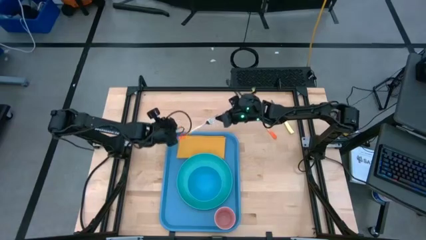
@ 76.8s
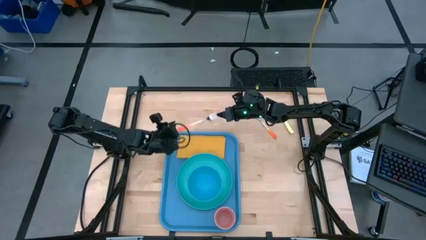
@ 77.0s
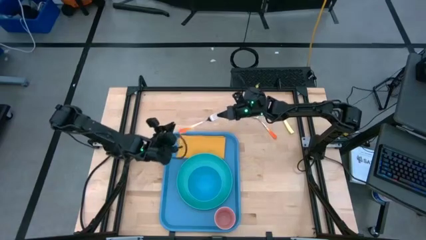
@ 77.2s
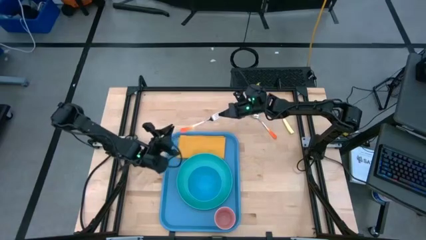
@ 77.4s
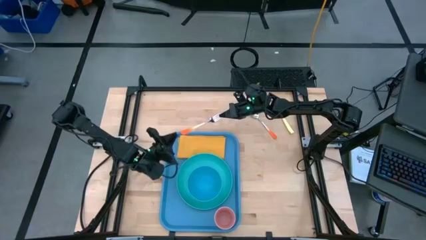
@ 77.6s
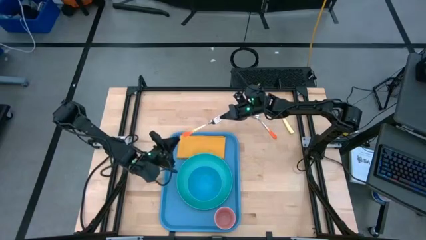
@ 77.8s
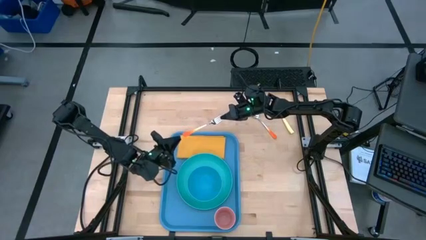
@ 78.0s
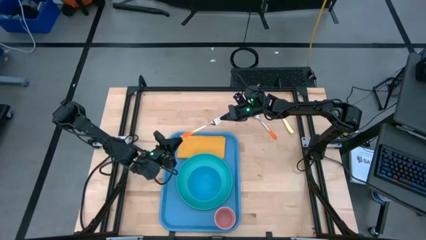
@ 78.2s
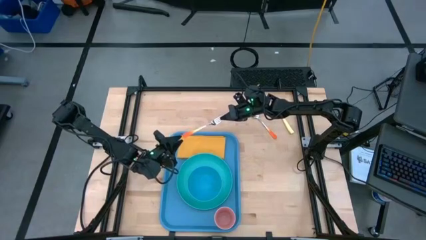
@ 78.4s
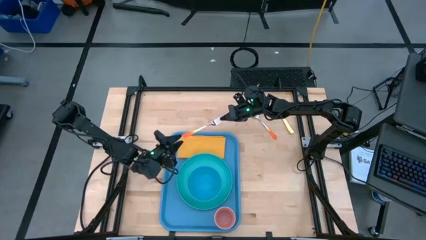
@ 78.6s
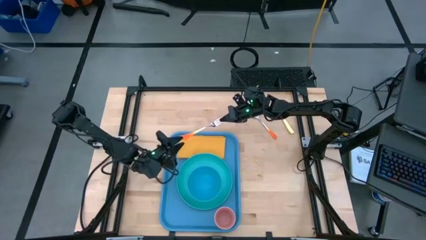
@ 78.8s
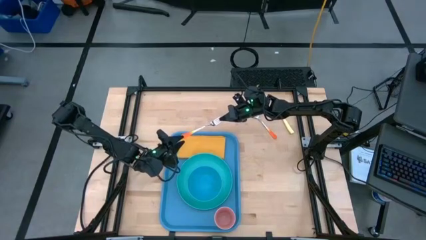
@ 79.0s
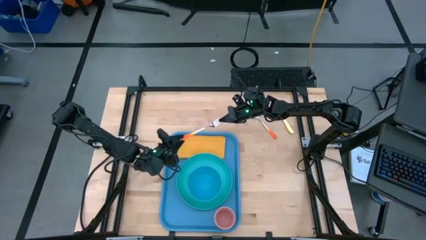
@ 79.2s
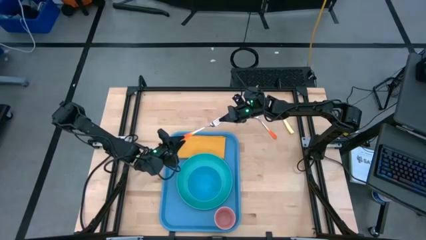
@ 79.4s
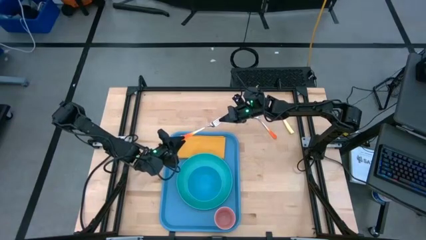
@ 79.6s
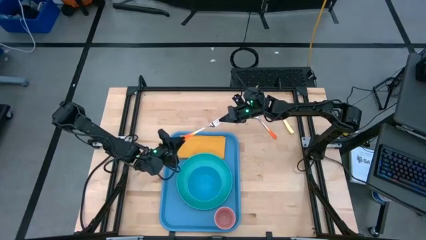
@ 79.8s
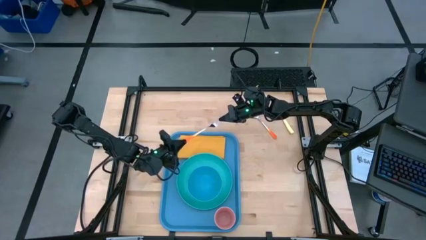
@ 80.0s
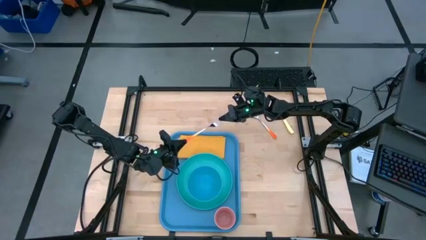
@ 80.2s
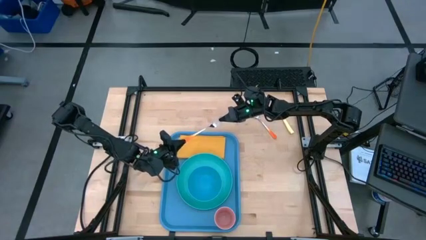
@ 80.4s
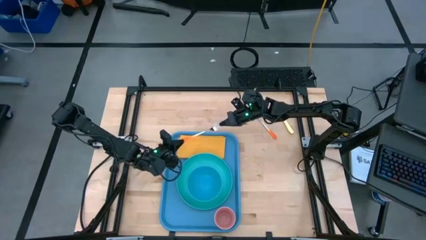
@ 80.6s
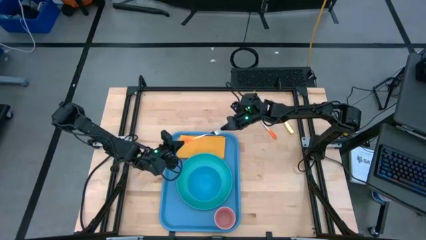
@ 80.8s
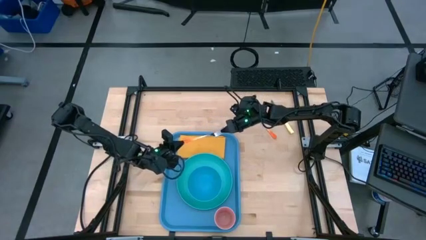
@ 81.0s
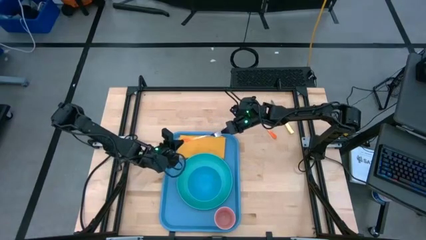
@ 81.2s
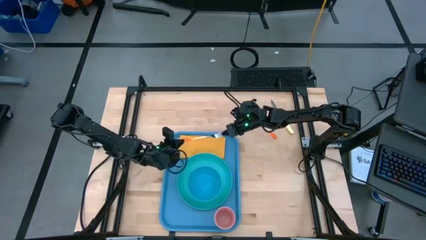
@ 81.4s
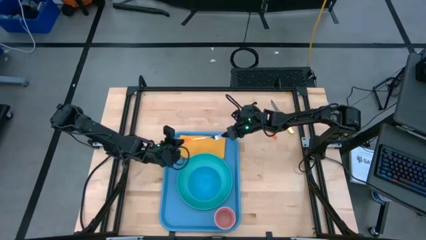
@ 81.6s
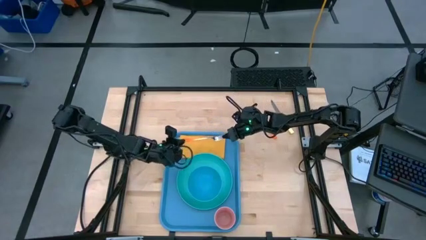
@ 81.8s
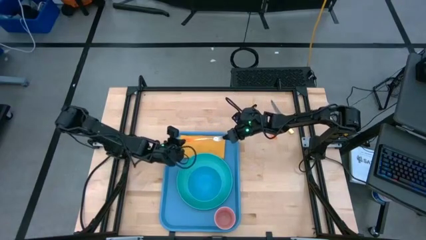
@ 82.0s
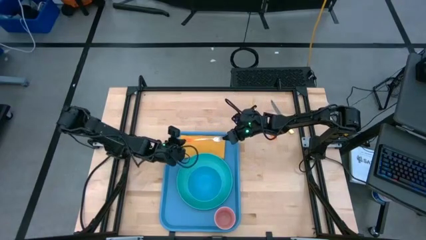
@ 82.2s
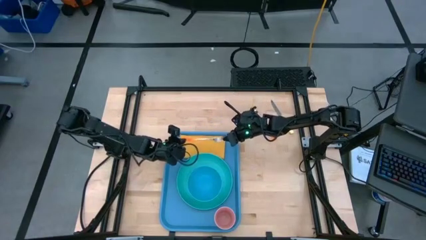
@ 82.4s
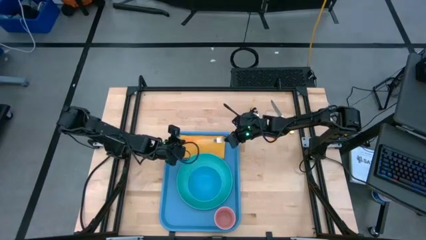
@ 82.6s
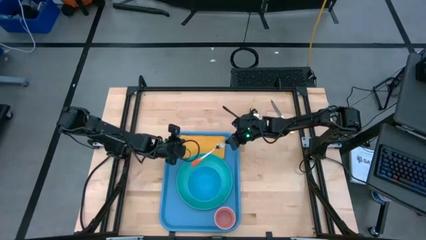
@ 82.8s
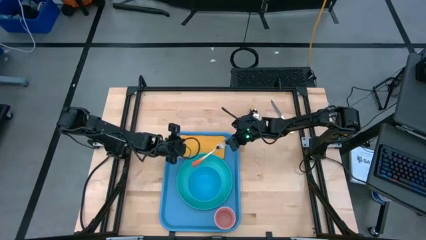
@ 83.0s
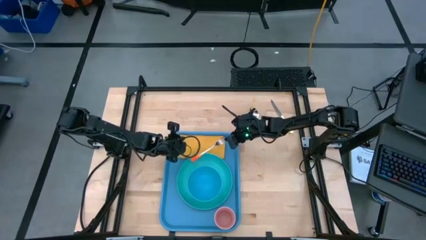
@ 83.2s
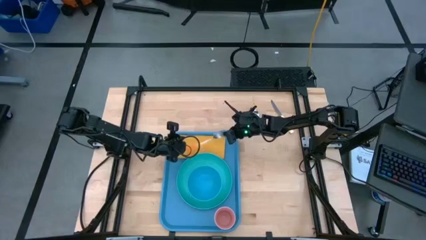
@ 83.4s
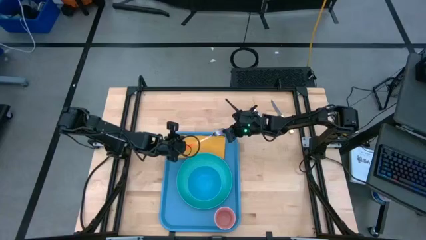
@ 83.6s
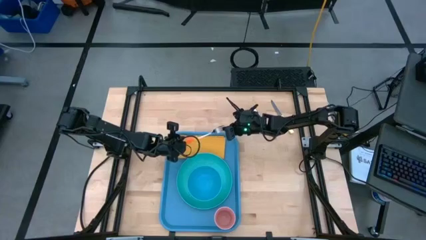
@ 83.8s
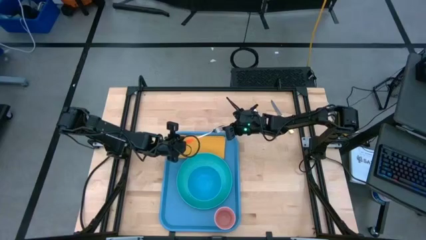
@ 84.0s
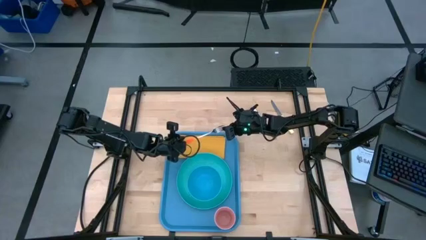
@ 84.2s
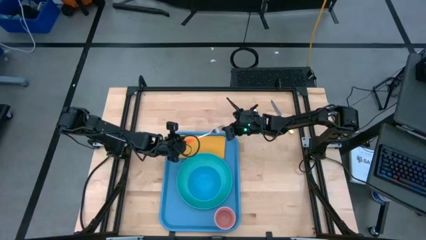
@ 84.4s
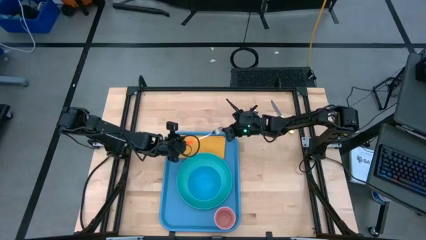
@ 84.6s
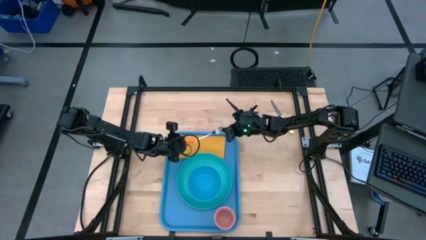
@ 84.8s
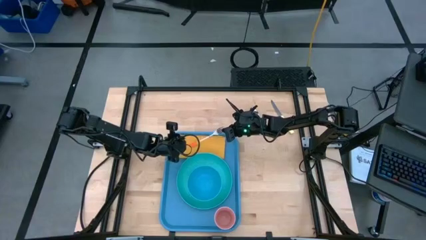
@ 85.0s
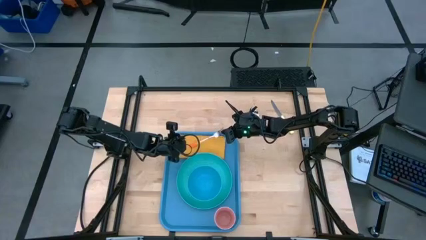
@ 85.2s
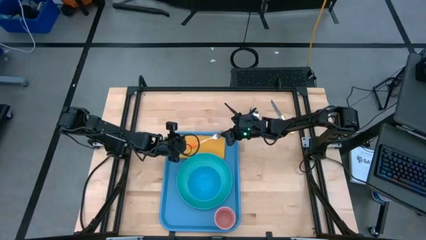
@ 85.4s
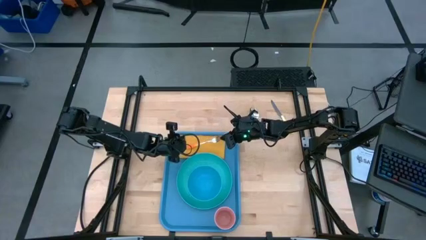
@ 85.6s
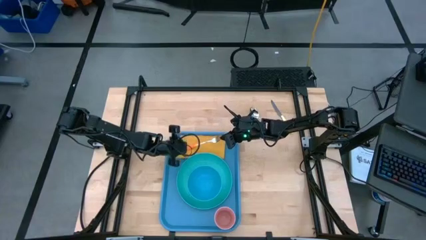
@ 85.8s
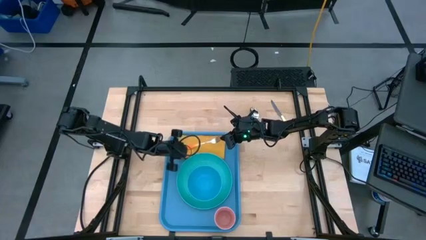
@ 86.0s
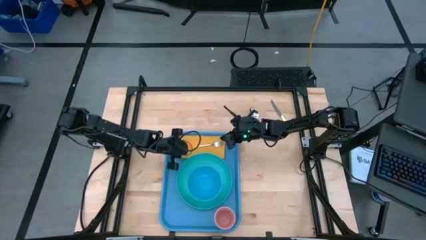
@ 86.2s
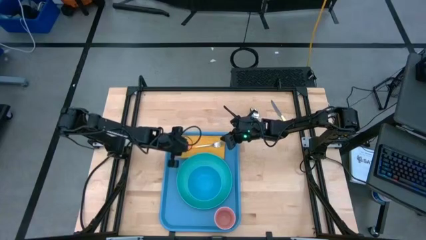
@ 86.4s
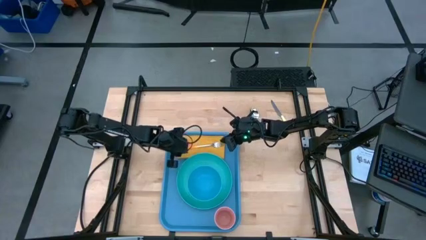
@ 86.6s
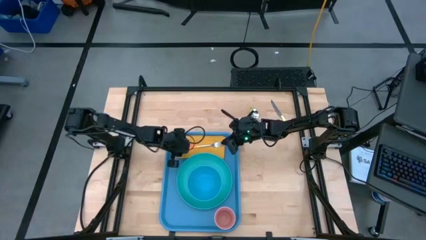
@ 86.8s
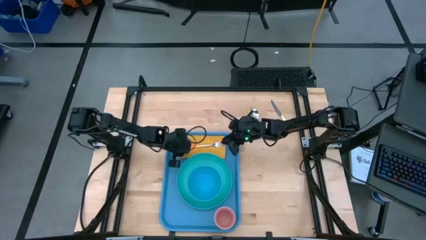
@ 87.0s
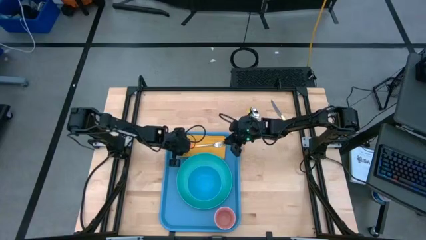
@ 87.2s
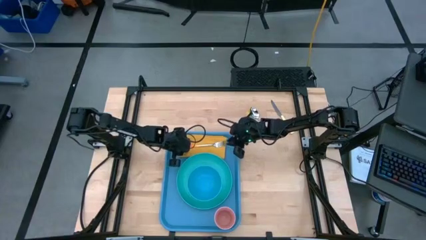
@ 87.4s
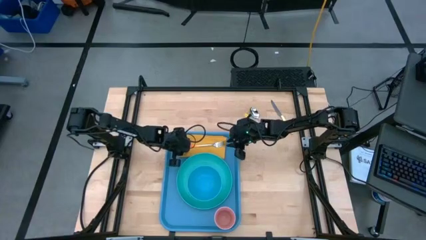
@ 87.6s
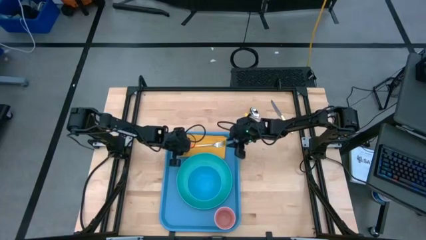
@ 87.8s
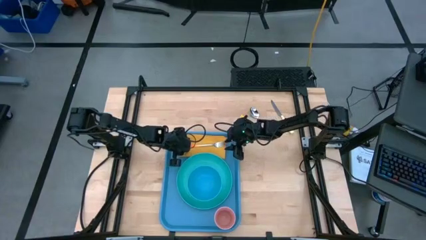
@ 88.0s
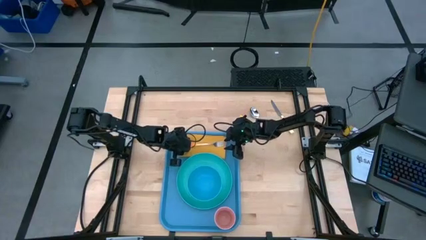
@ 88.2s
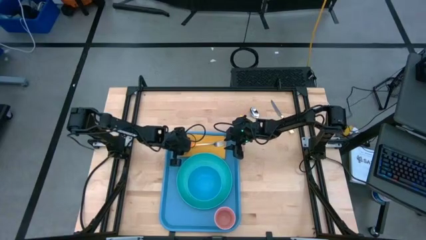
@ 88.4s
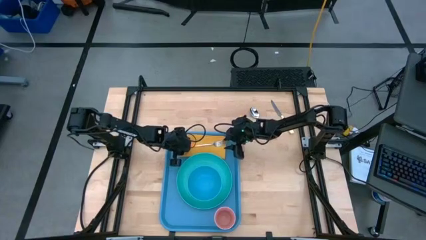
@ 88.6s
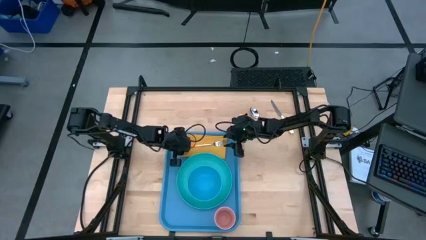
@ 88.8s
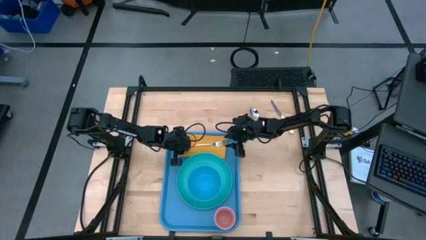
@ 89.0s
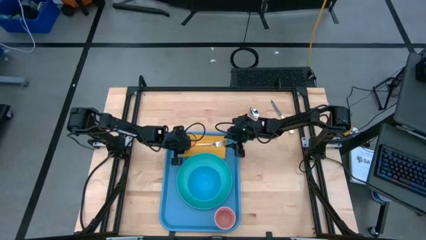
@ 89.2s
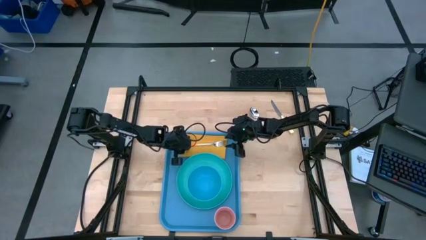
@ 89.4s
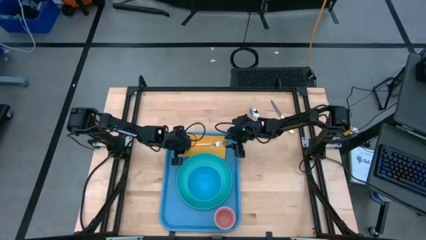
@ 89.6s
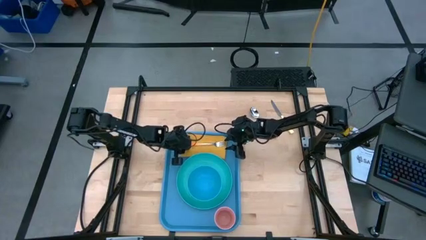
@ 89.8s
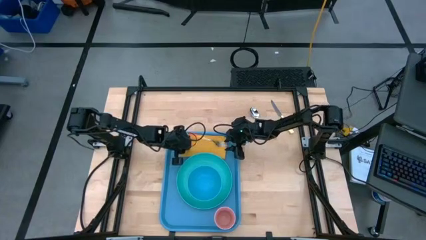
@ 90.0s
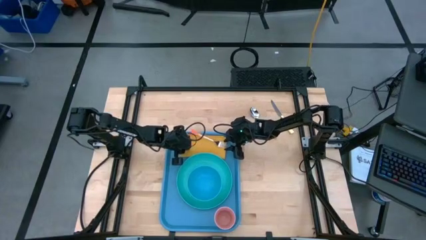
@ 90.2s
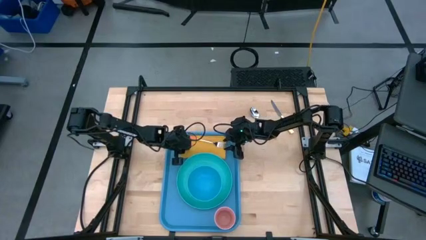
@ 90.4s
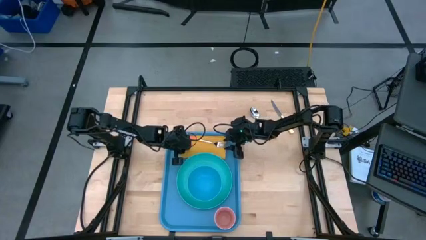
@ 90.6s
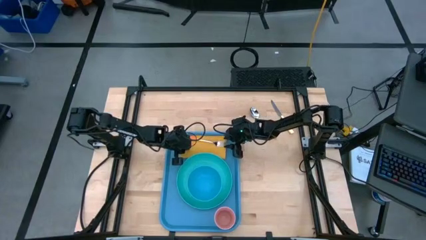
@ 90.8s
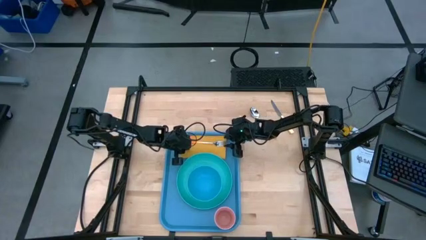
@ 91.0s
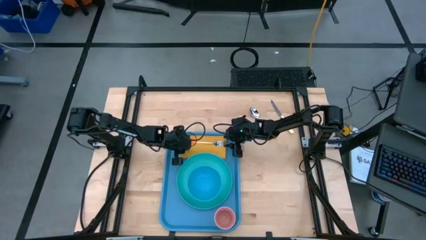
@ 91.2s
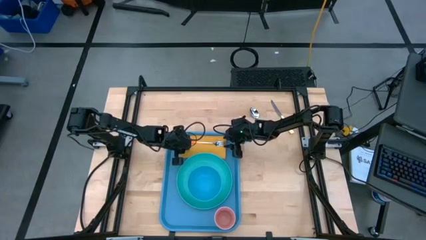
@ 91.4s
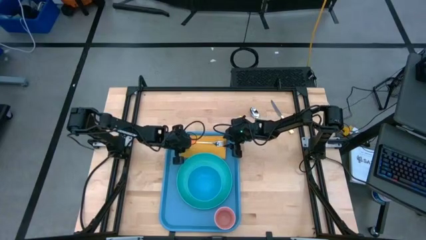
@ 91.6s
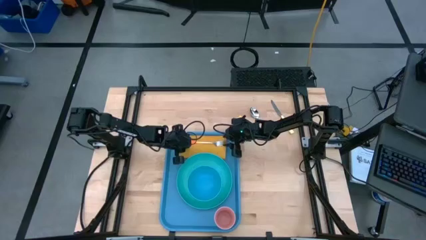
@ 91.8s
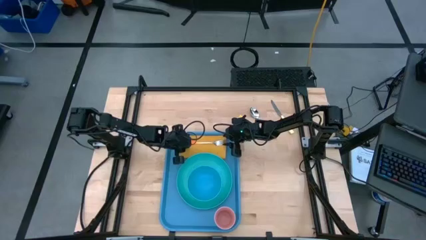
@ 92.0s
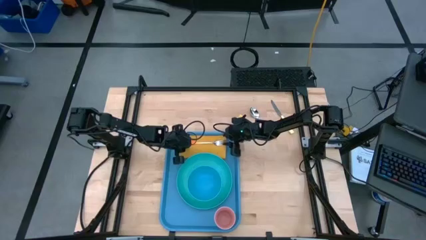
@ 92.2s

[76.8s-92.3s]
Task: Set up tray
Put the orange fork on top of the orange napkin

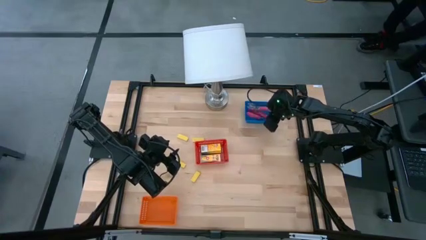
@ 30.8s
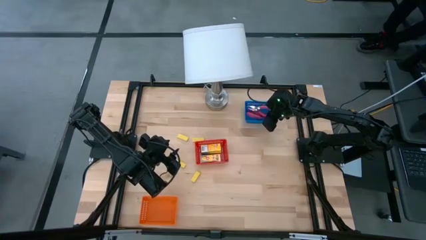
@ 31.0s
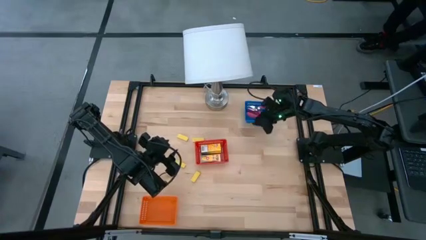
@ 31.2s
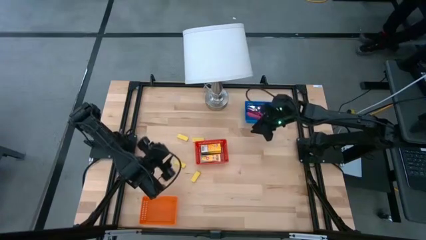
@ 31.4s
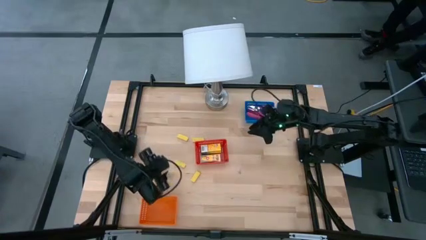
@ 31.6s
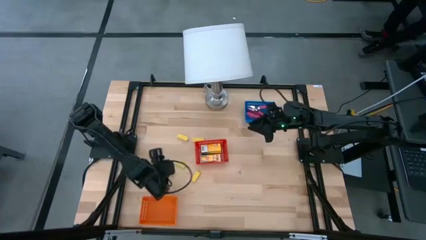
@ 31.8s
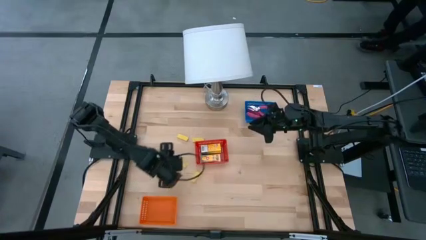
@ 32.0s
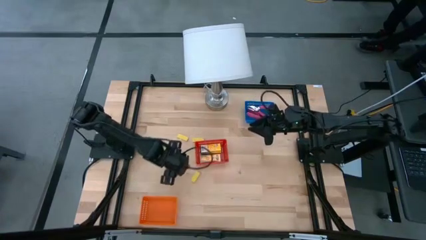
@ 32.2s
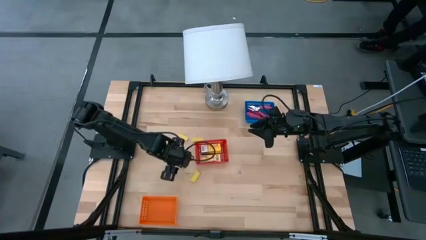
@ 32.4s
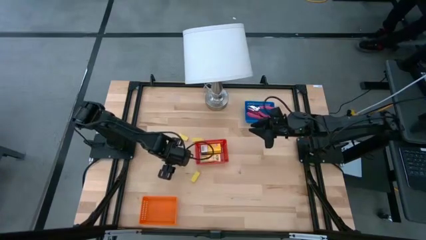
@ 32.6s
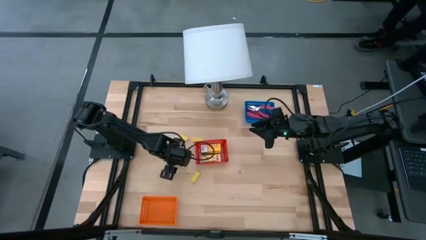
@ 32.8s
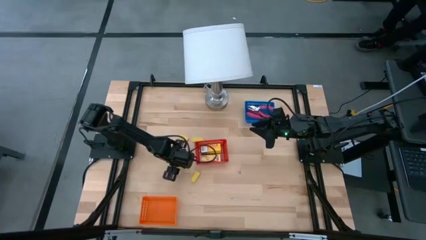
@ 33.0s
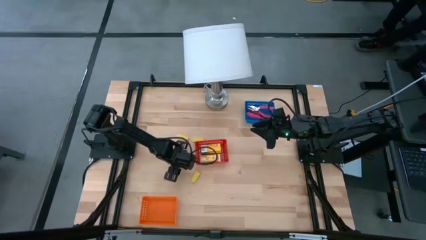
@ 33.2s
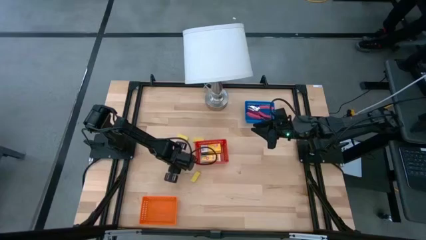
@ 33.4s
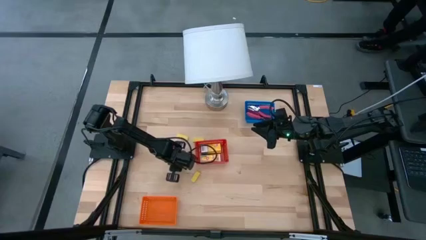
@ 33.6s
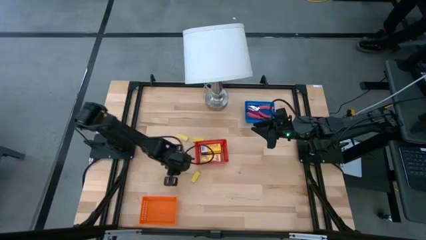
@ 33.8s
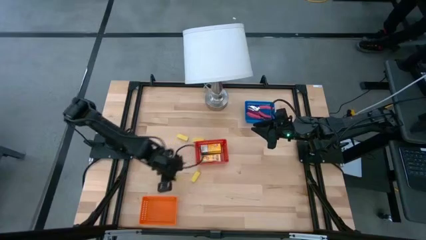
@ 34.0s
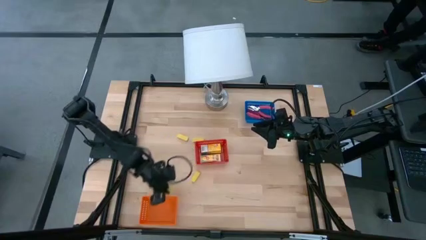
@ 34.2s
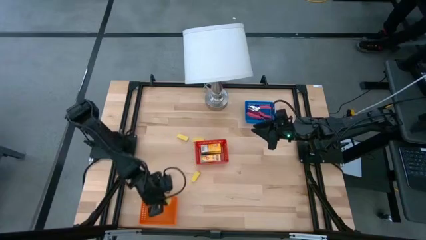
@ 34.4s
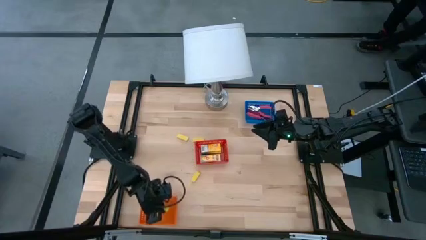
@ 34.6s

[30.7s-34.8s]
Task: Pick & Place School Supplies
Put the yellow eraser into the orange bin
